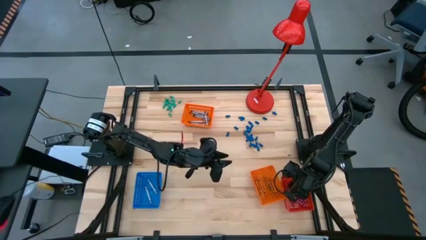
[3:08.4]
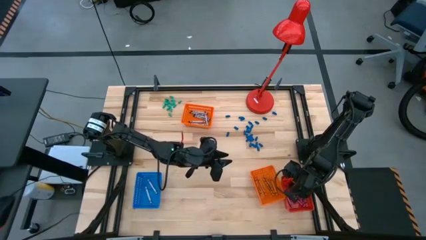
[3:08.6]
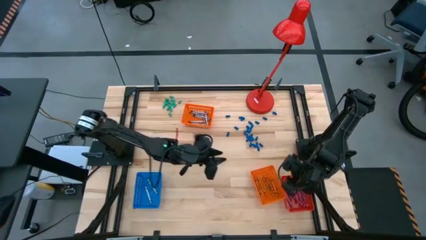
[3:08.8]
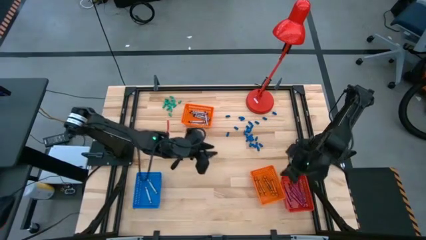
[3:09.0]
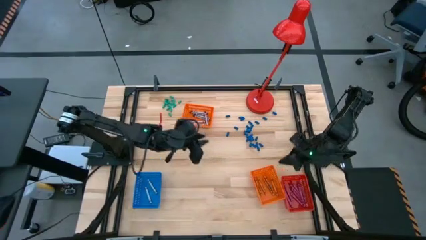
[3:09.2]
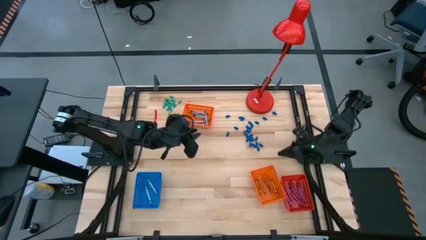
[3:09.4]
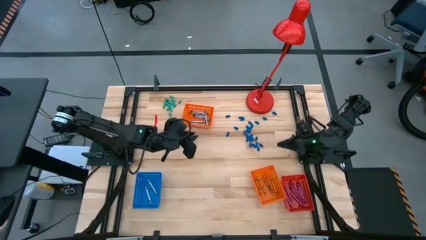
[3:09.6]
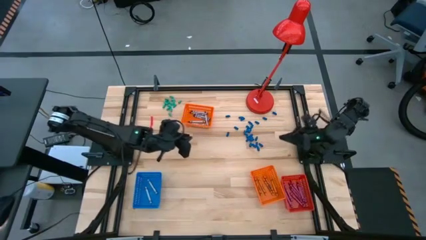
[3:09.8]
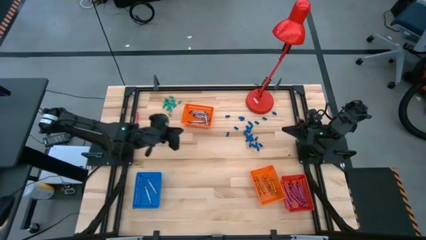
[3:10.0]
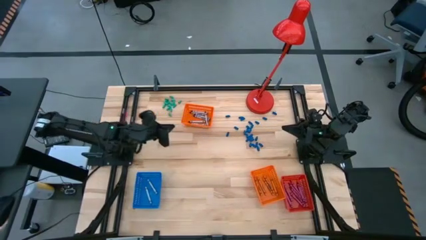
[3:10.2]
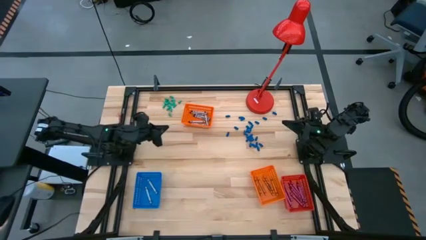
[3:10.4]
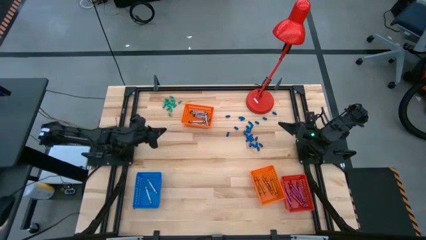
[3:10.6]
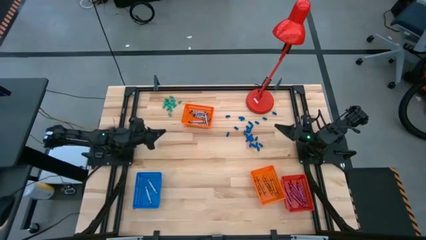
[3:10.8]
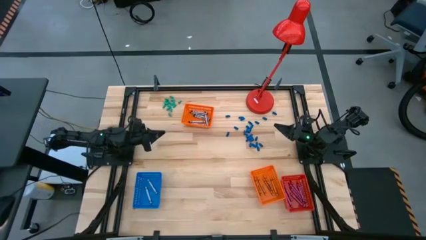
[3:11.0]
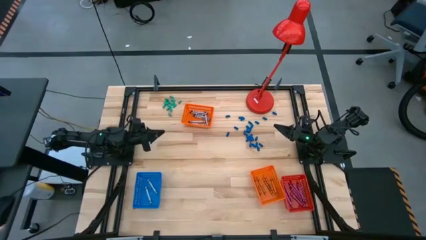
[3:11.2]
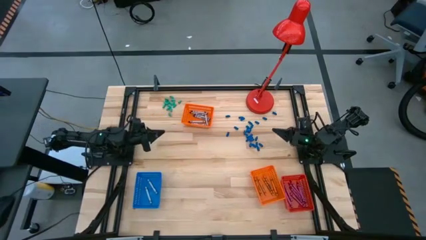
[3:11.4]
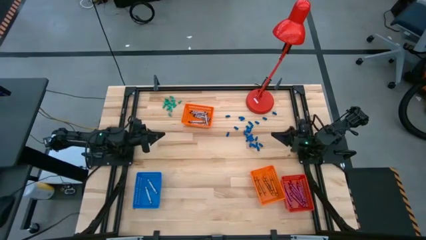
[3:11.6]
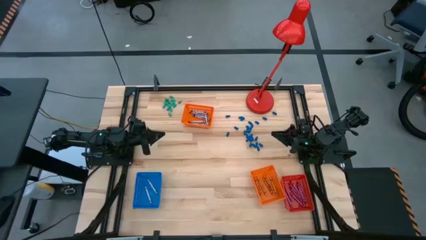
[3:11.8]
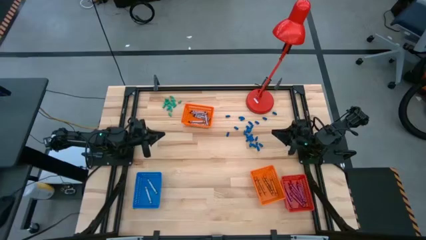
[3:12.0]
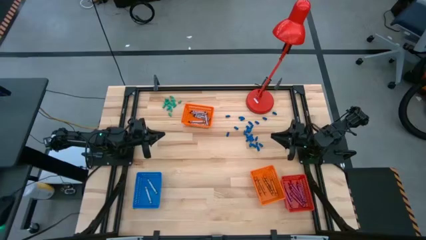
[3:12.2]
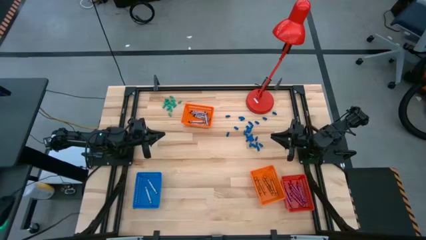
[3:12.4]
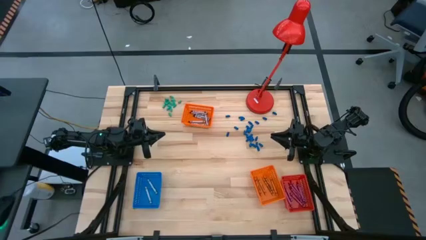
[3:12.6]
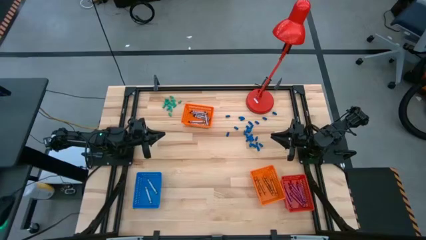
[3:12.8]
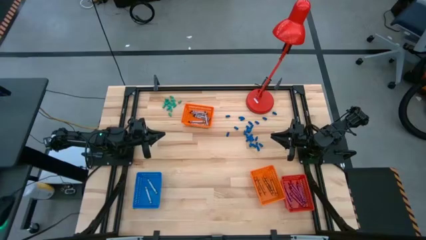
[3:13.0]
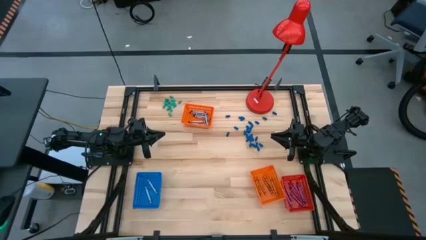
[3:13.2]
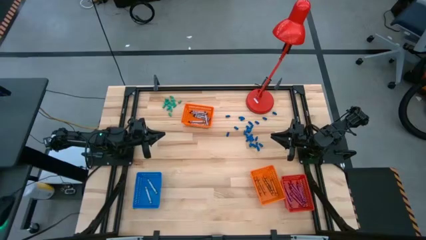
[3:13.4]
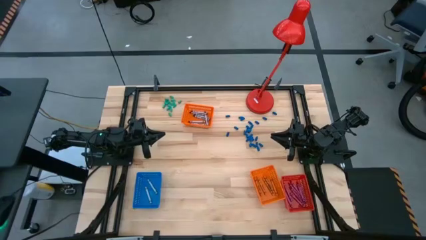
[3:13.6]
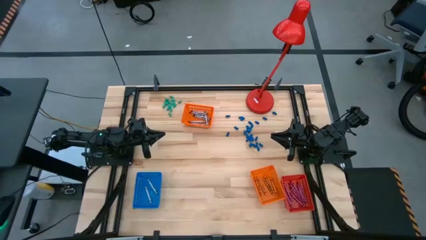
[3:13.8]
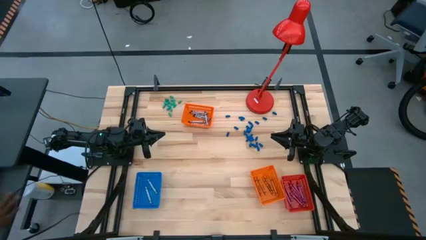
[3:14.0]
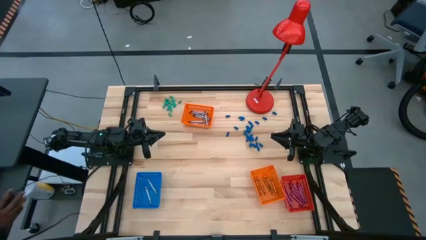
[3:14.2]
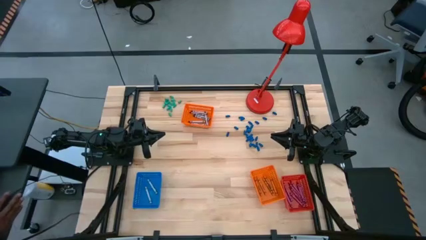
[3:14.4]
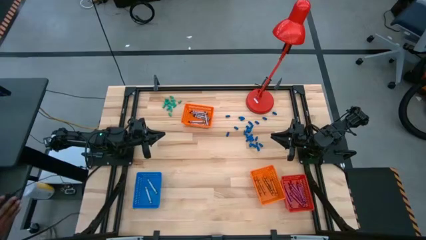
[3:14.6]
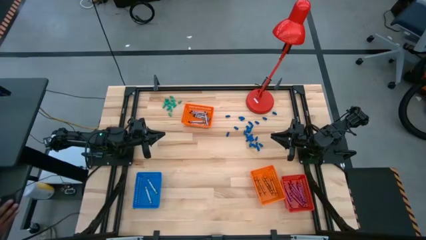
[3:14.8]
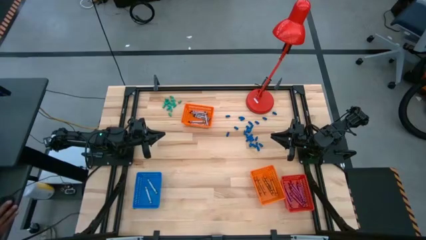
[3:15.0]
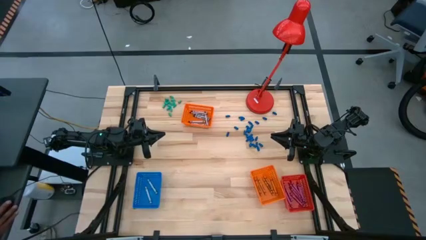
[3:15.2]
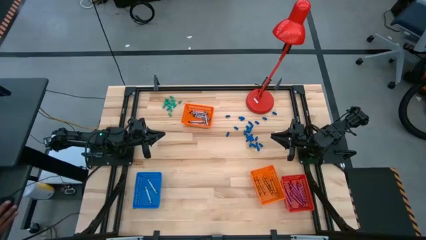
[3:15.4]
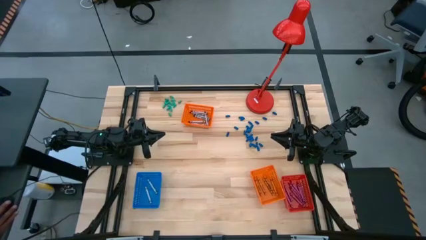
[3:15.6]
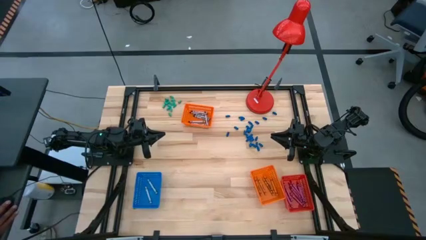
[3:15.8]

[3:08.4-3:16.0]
Task: Sort crayons
Return to Home Position

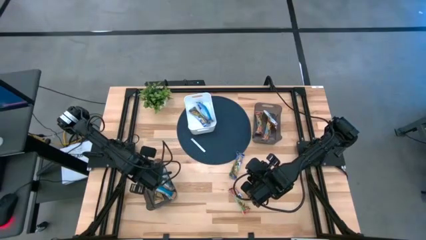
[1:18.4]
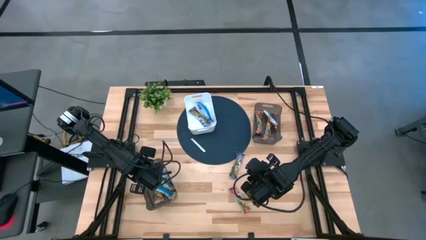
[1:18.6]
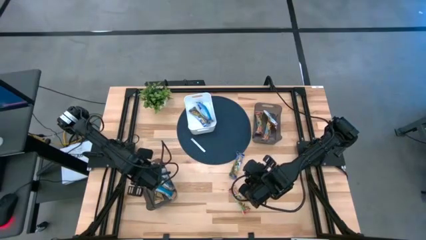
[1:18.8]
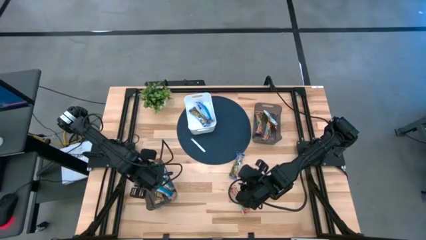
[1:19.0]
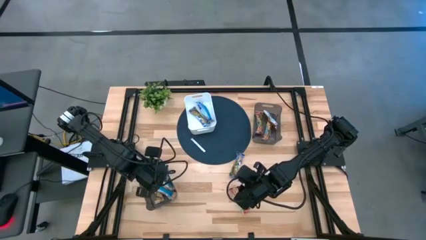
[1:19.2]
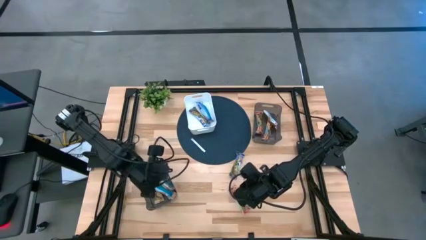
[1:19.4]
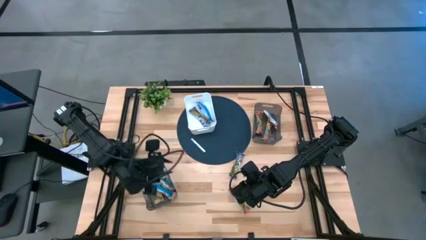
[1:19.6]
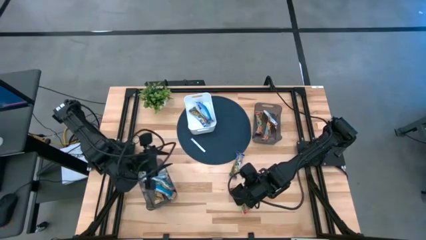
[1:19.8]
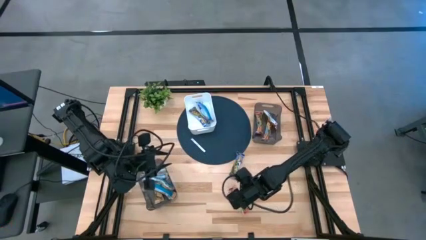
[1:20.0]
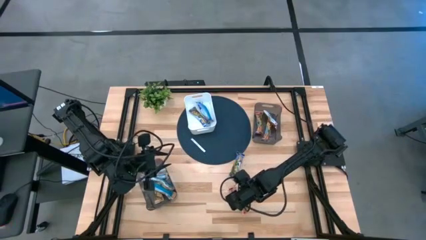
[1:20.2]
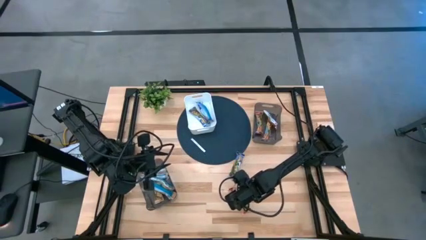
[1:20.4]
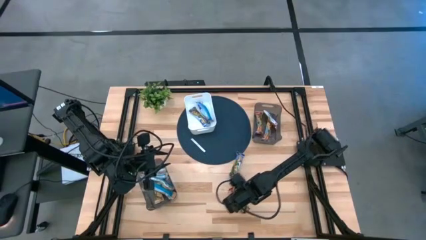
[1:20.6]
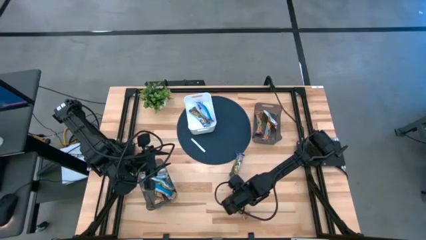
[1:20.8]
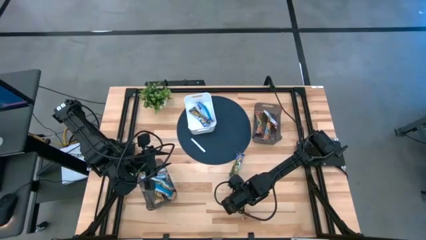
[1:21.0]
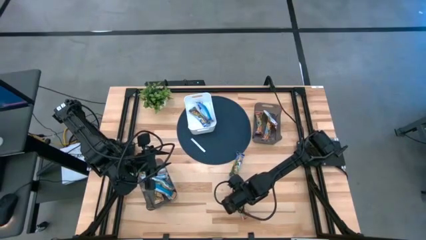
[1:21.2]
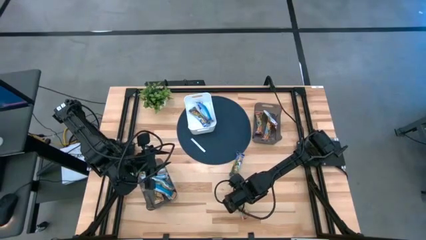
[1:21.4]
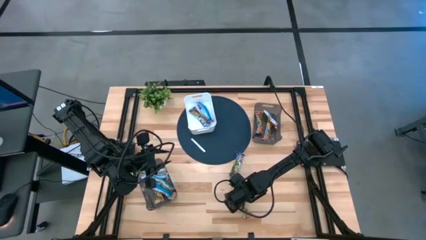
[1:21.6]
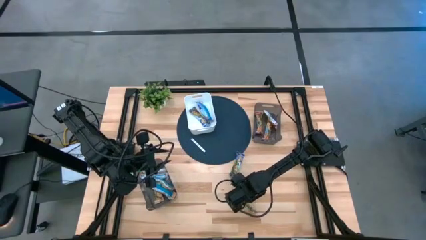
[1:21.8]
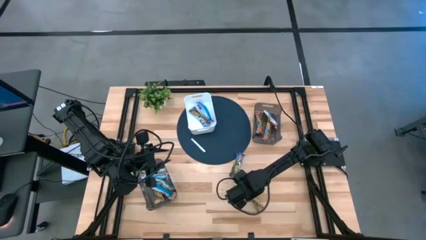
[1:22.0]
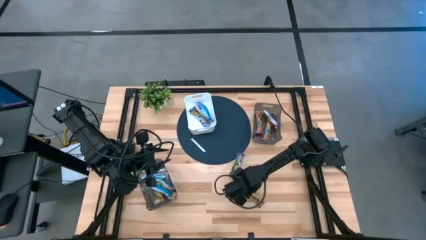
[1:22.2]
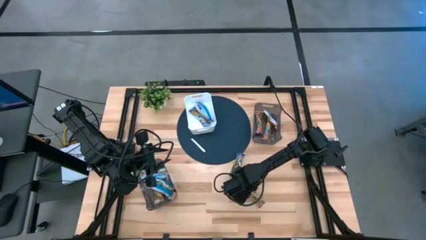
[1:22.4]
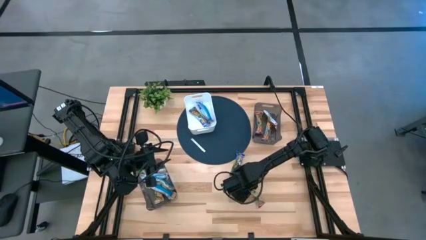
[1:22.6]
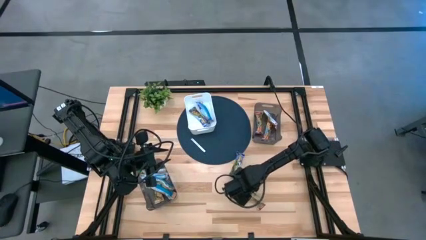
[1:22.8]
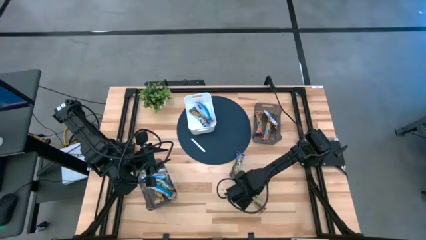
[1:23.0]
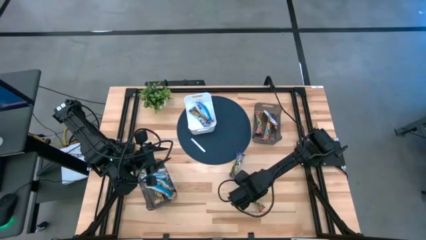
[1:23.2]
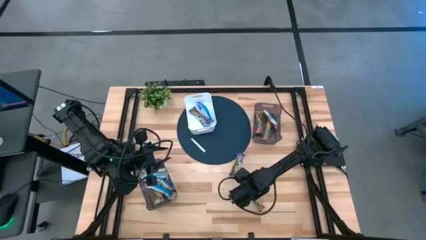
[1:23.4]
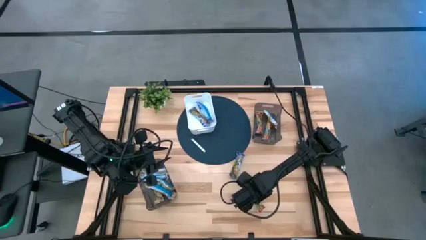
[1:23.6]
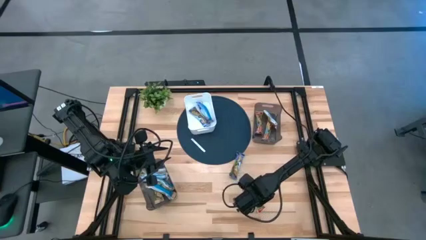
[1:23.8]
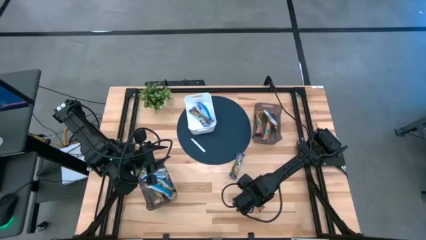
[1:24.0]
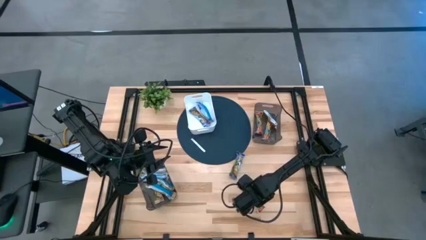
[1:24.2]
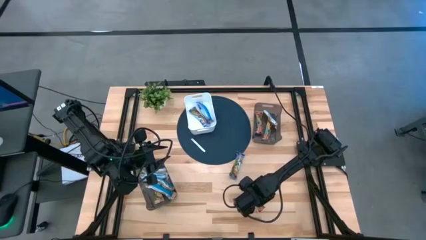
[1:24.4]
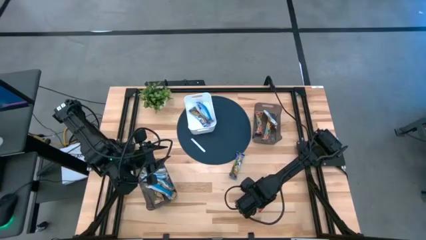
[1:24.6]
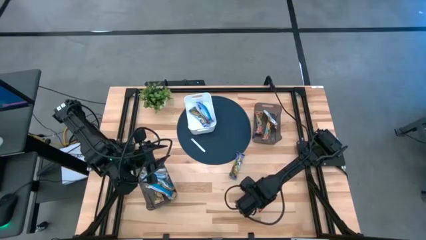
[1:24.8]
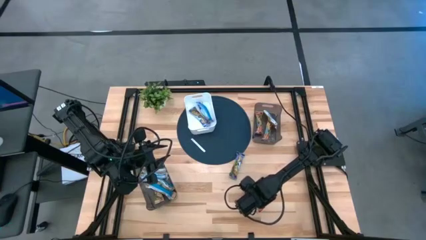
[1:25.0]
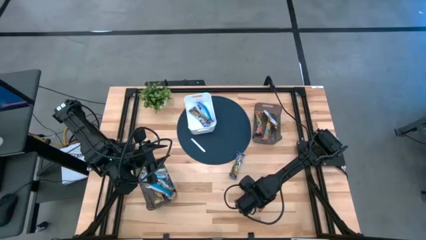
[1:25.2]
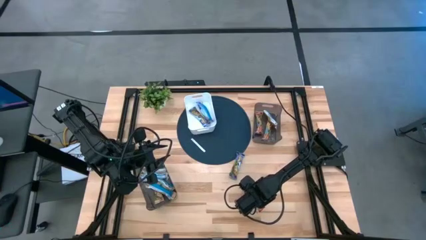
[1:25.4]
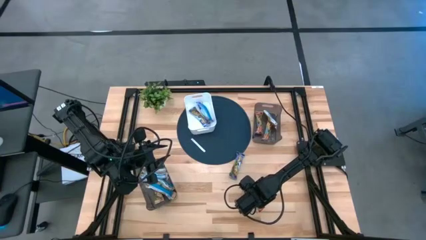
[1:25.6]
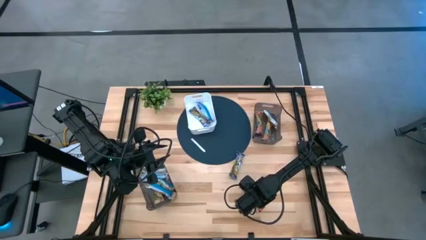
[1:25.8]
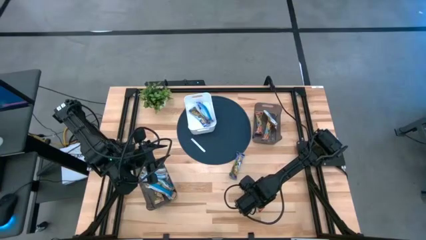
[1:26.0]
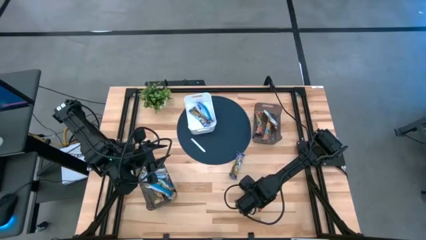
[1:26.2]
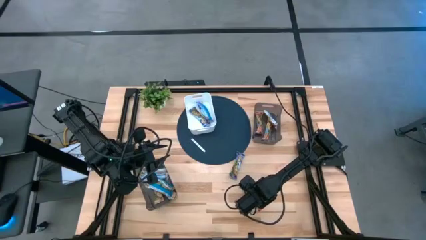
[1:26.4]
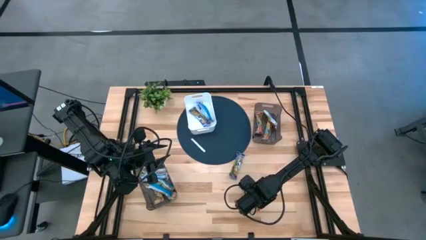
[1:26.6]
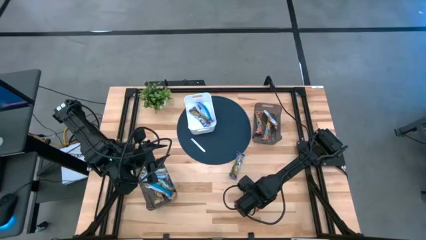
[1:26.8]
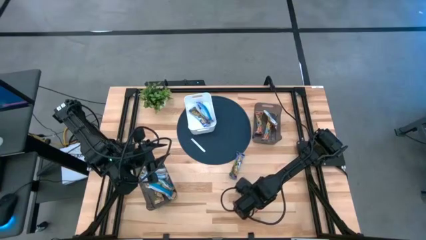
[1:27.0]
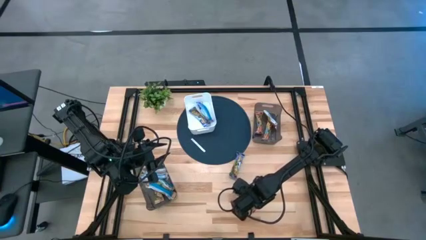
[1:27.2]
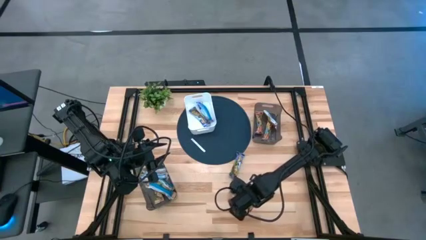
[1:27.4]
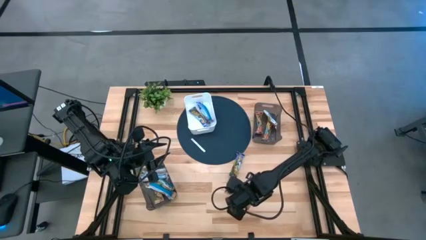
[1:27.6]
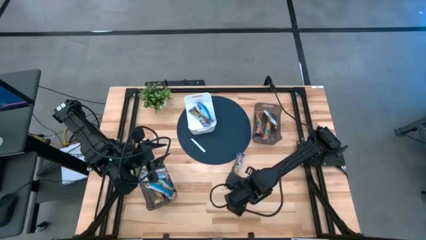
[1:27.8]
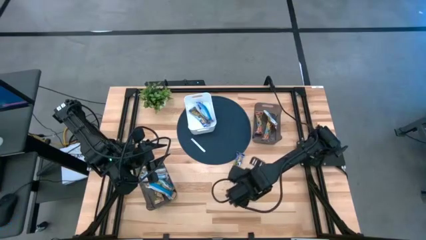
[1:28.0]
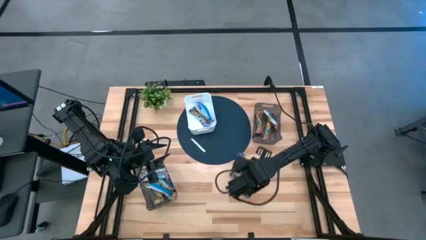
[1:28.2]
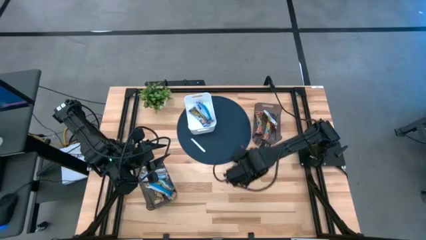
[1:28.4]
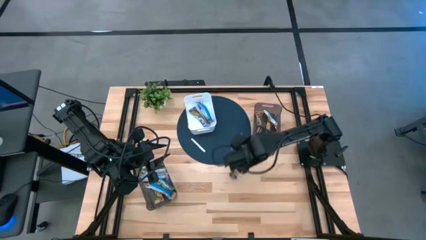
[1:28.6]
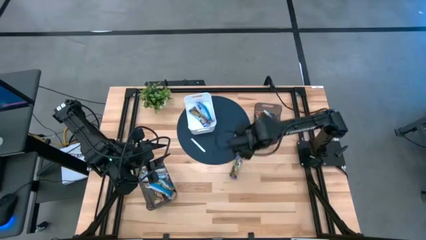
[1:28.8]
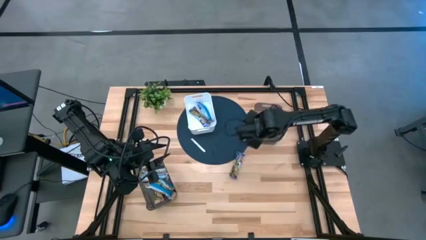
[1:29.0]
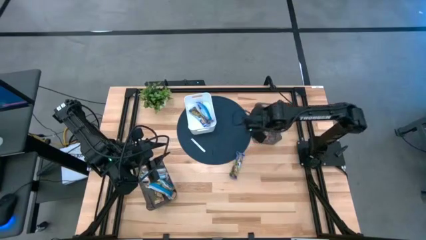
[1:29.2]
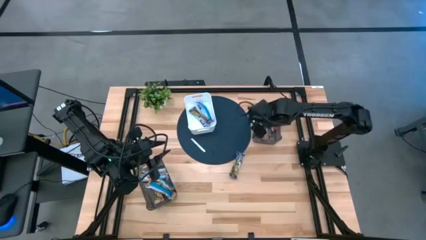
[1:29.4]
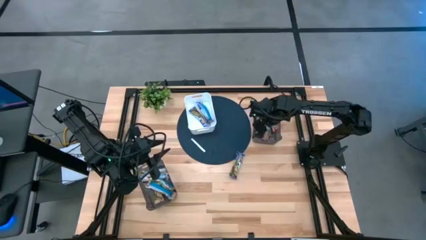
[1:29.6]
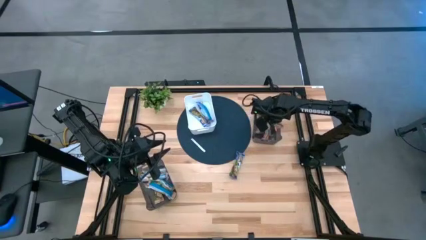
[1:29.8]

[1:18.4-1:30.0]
Task: Pick and place Granola Bars by type
Put the red granola bar into the top black bin
